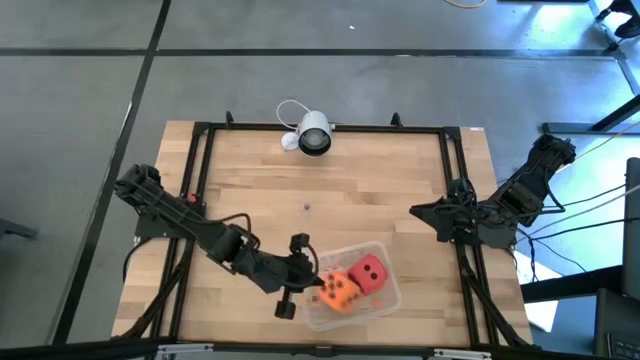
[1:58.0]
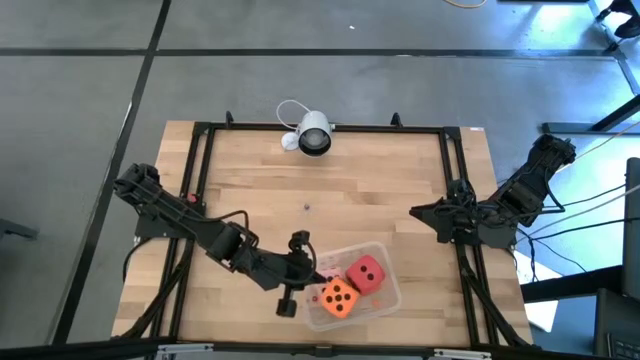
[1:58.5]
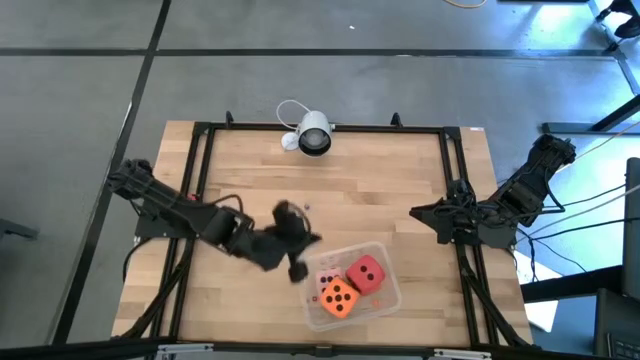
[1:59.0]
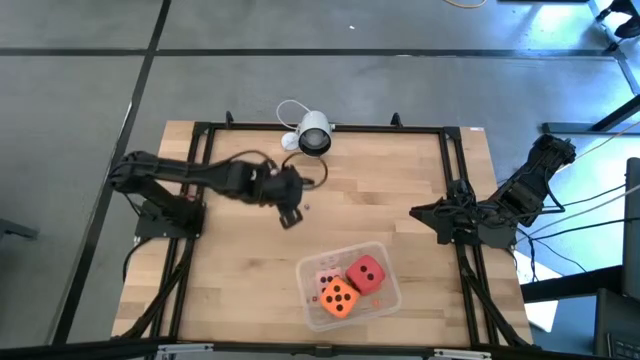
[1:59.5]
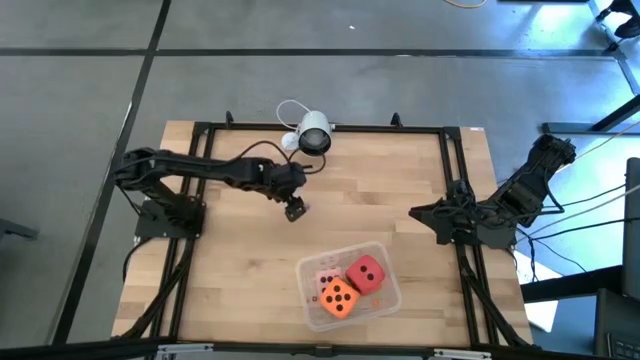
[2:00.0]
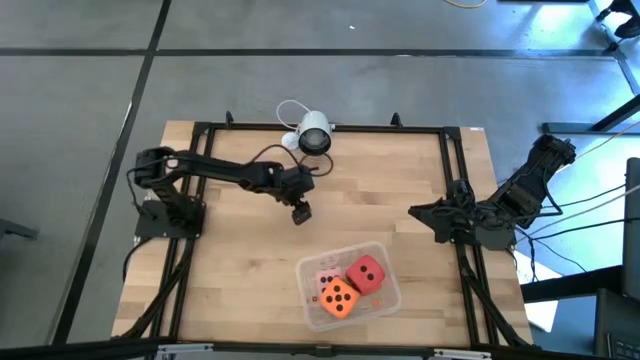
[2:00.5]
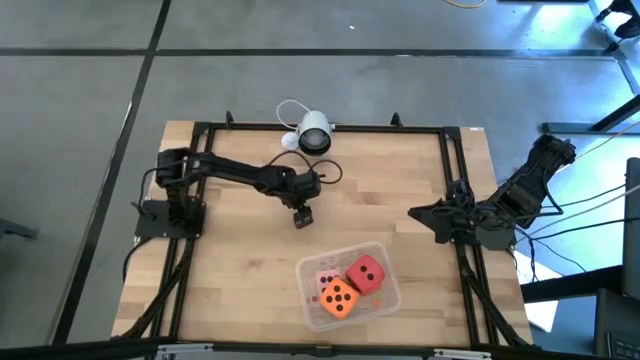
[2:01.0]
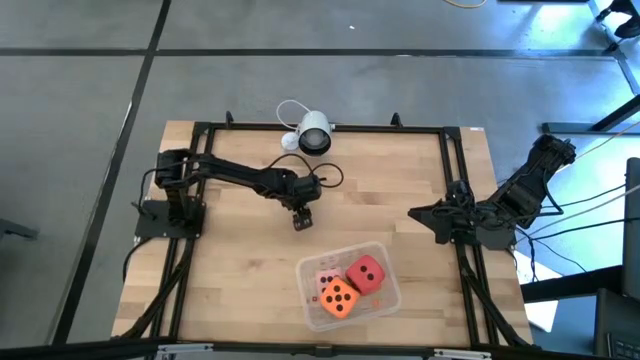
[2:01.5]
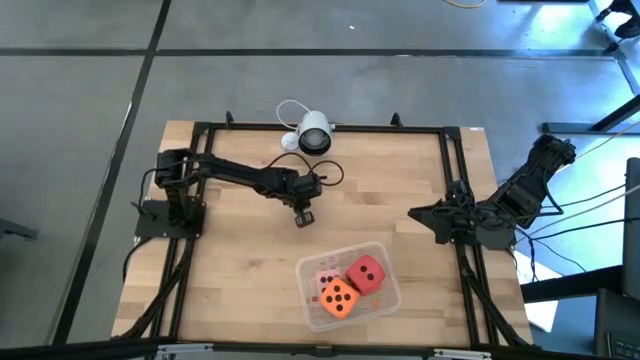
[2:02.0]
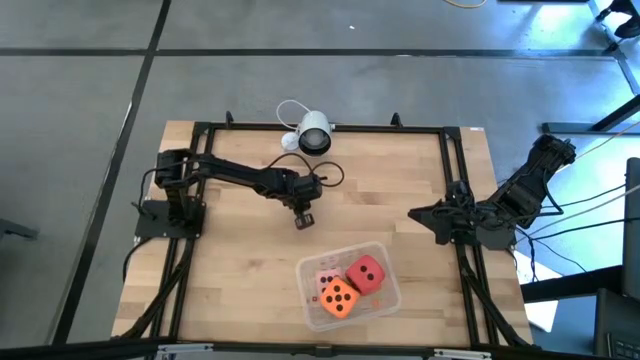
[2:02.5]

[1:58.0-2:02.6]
Task: Pick & Place Dice
Put the small blue die into the transparent bin

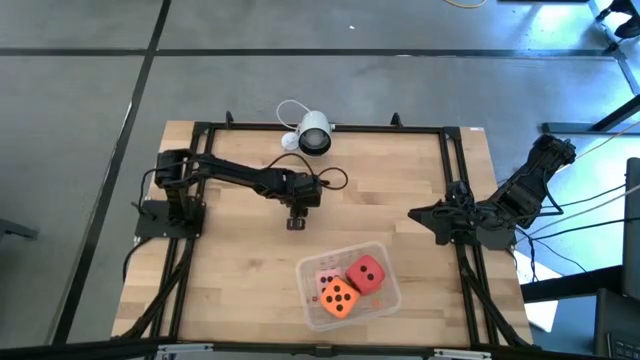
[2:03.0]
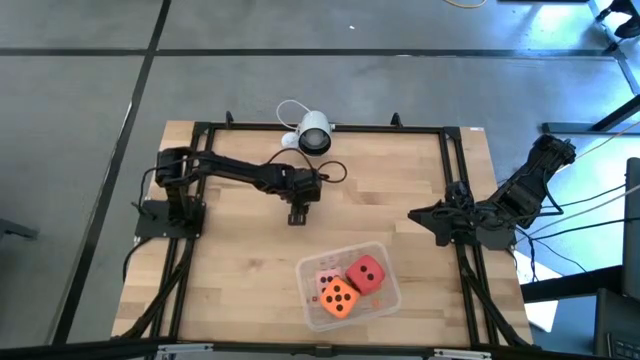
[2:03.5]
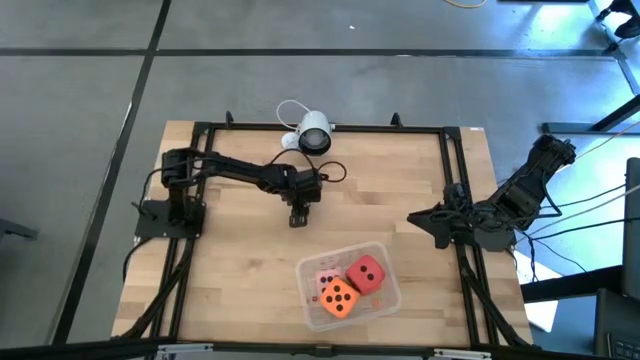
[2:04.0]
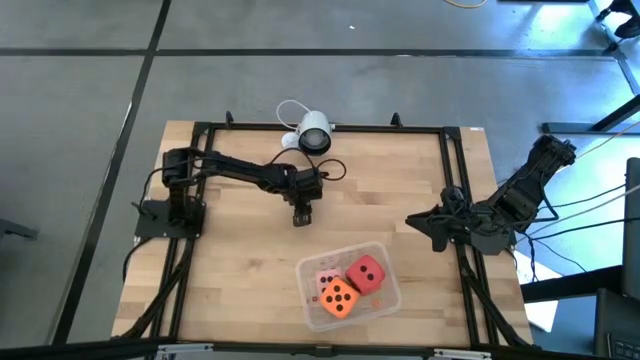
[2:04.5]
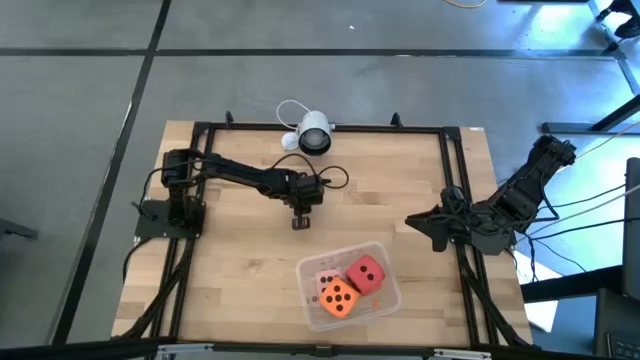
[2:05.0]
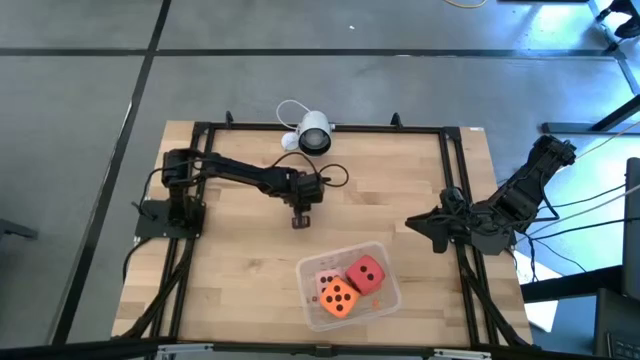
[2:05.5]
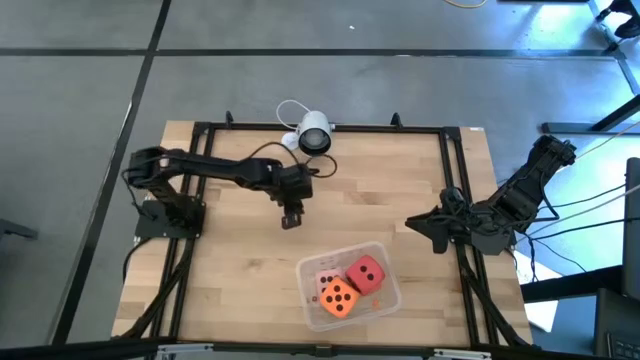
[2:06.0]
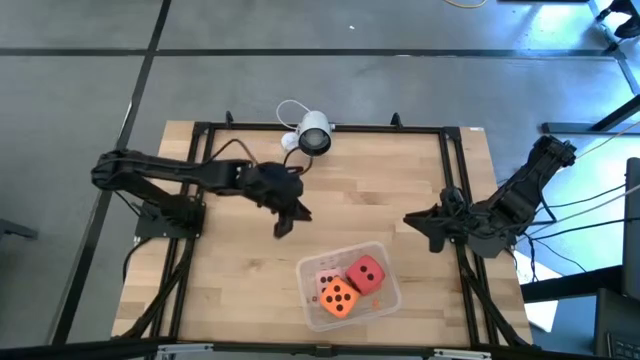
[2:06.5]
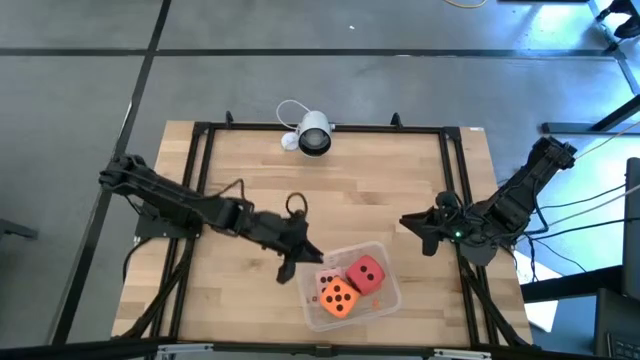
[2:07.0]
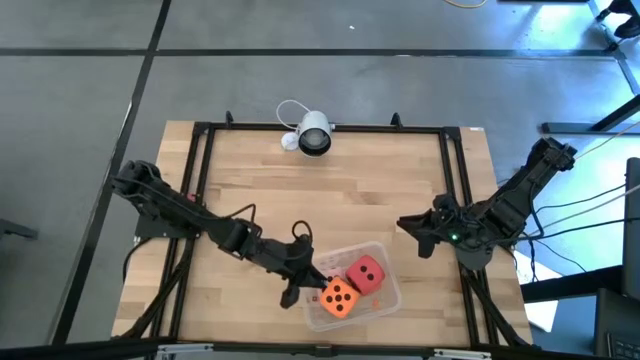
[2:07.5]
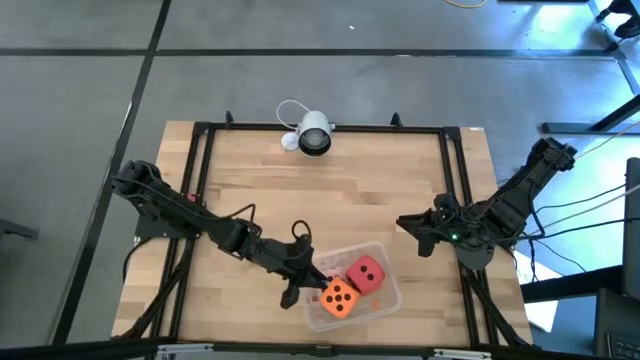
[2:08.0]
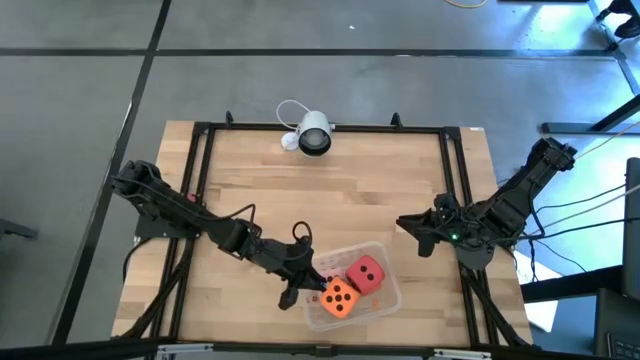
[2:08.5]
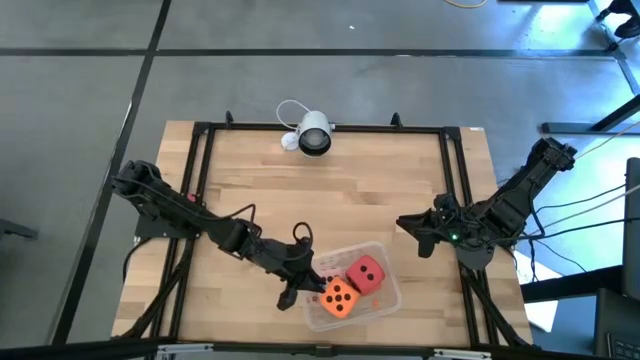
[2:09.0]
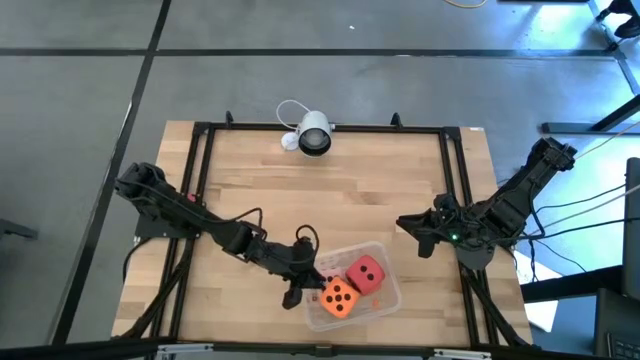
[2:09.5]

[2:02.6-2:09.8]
Put the small blue die into the transparent bin

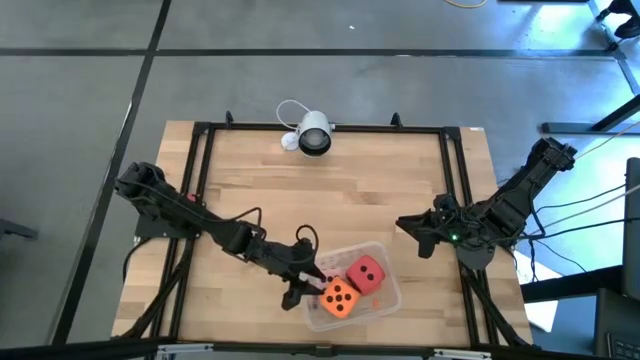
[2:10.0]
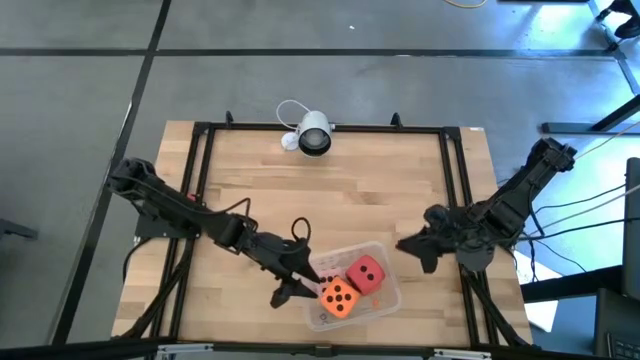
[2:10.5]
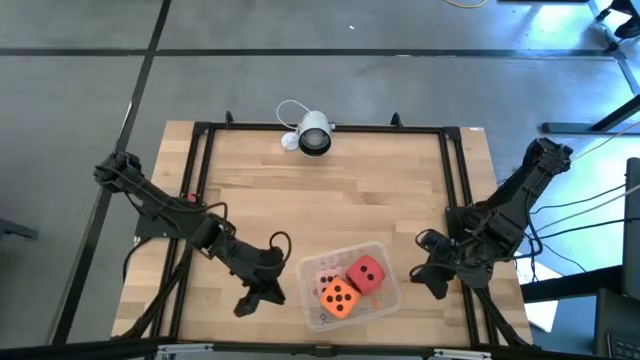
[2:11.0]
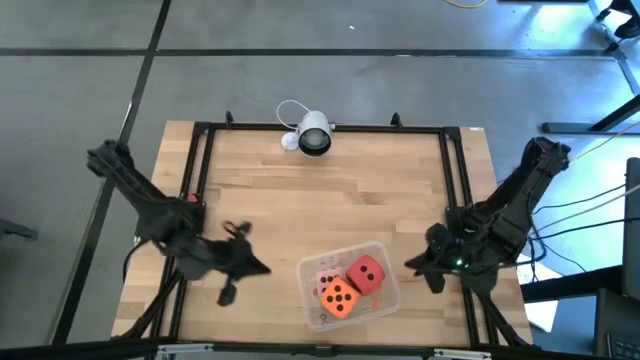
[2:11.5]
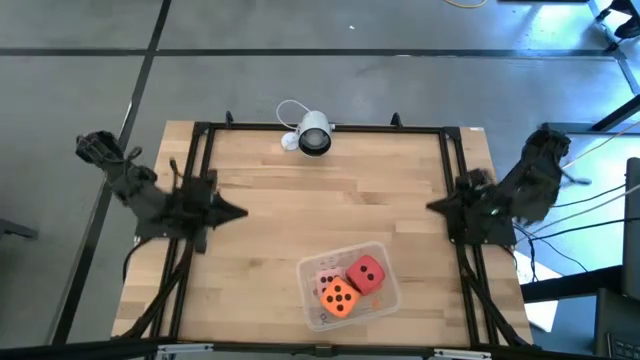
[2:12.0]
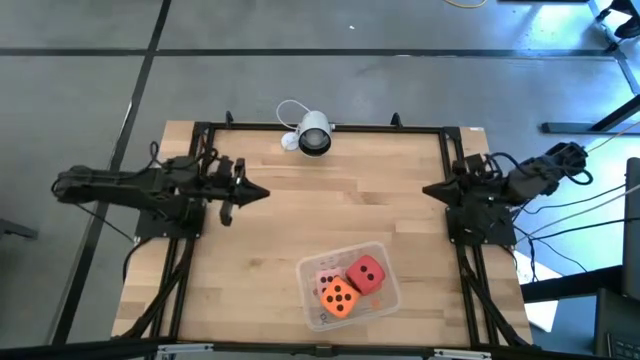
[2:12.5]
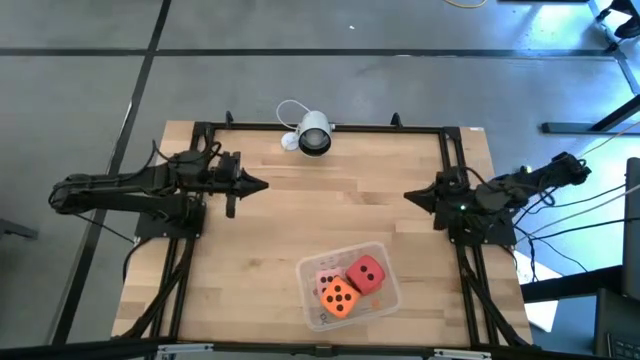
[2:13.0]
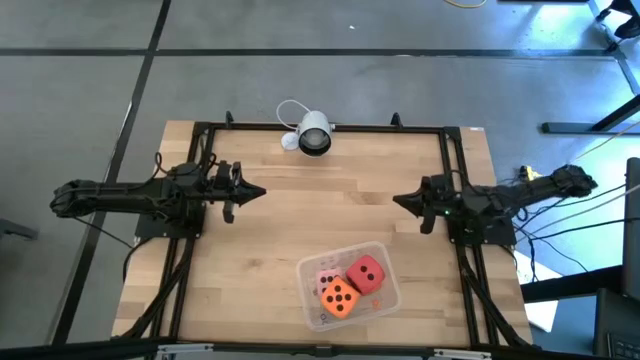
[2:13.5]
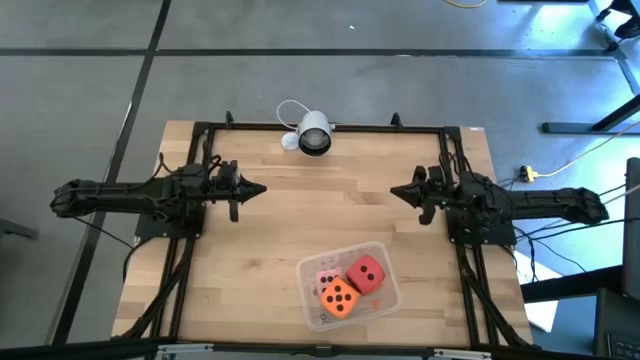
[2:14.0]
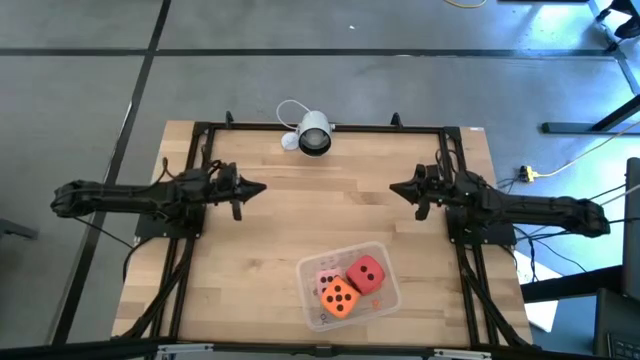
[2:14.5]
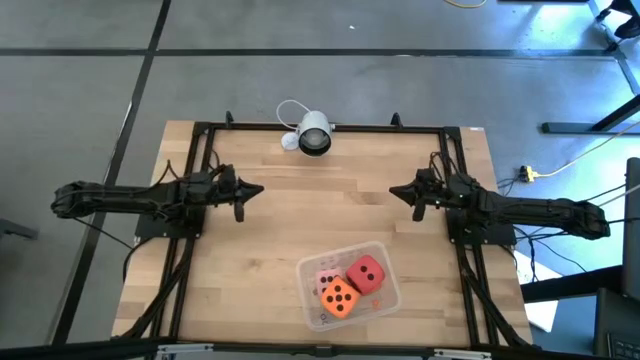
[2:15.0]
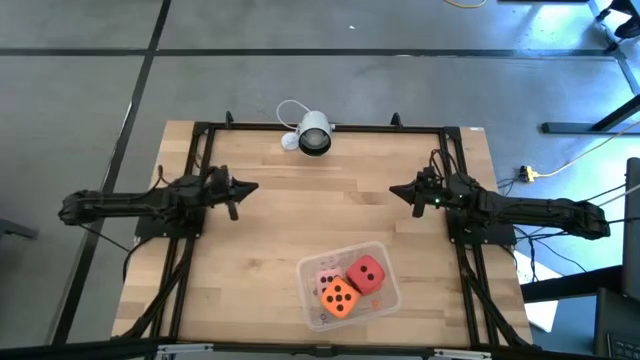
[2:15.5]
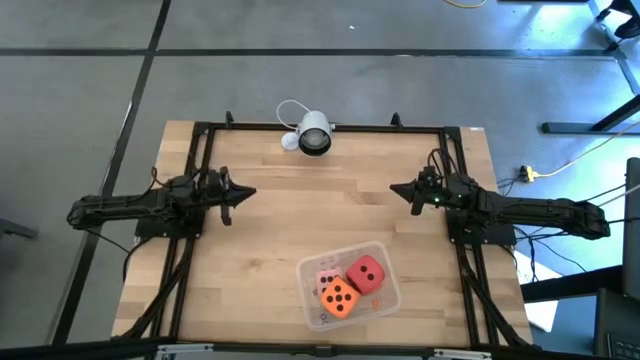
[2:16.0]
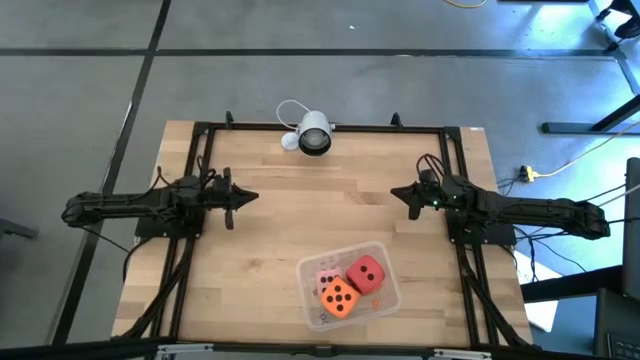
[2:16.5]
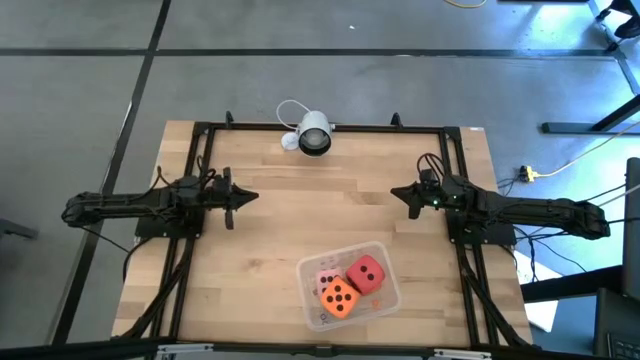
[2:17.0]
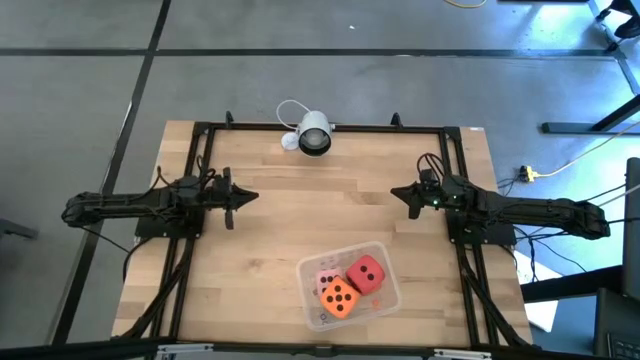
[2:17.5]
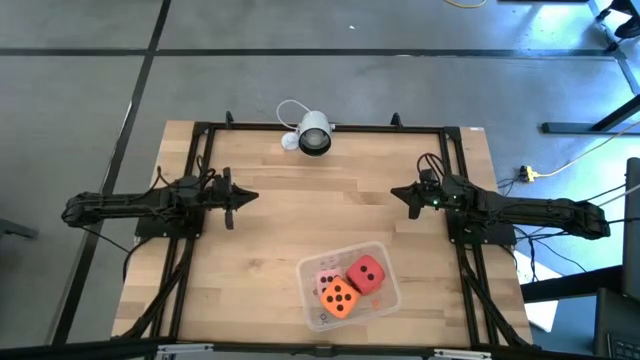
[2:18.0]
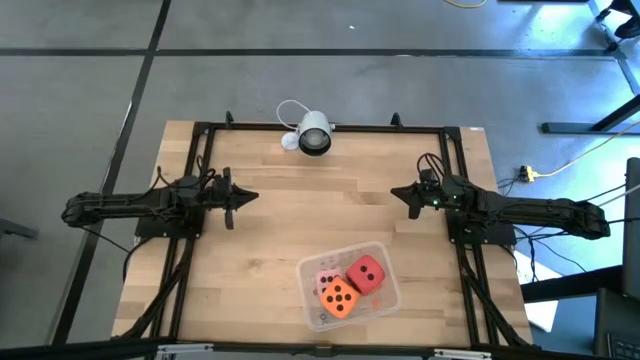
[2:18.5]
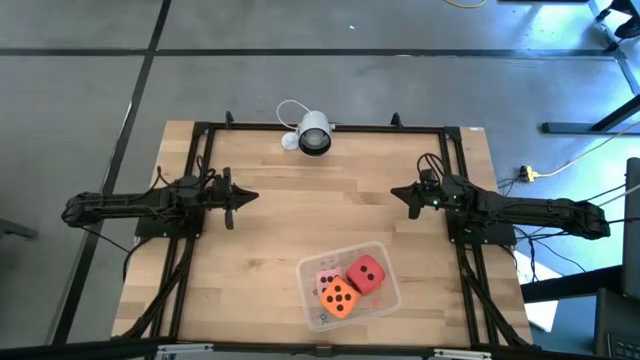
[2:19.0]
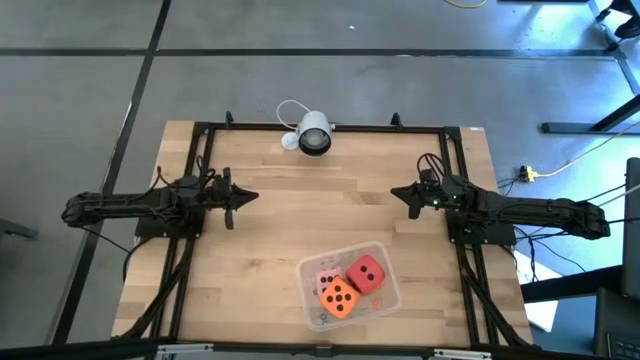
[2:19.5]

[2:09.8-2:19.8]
Return to Home Position
